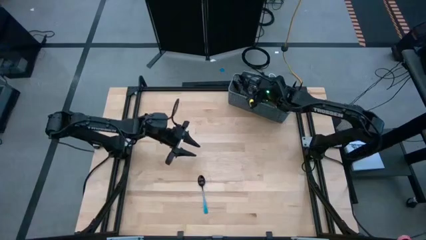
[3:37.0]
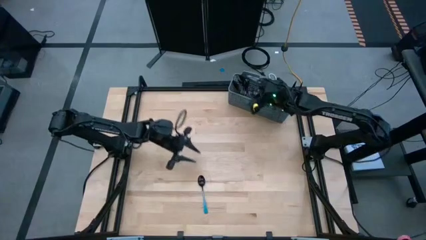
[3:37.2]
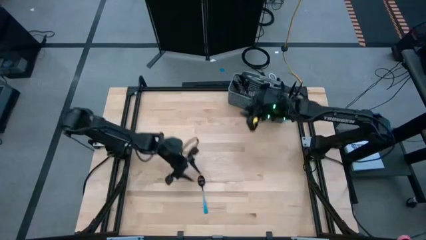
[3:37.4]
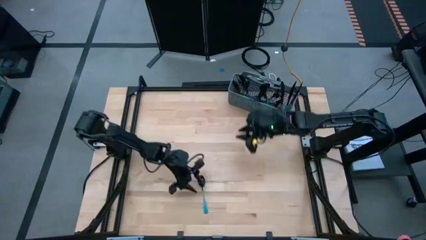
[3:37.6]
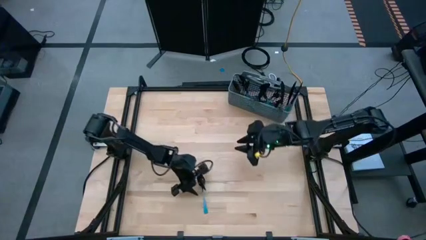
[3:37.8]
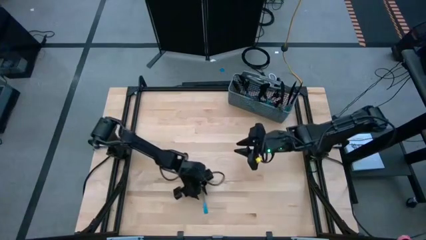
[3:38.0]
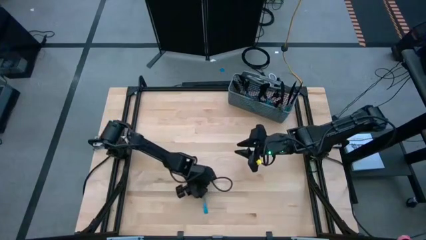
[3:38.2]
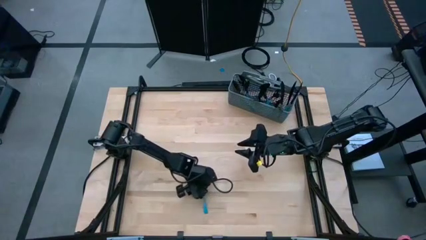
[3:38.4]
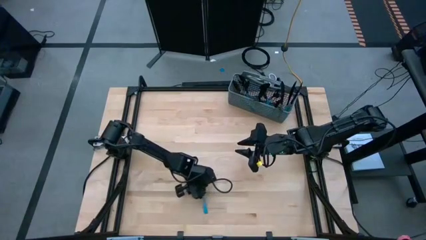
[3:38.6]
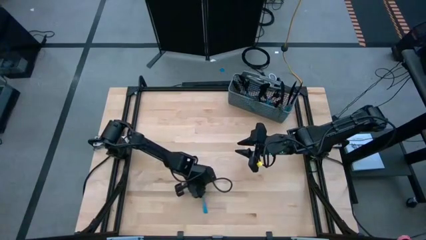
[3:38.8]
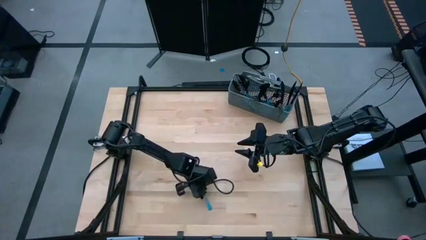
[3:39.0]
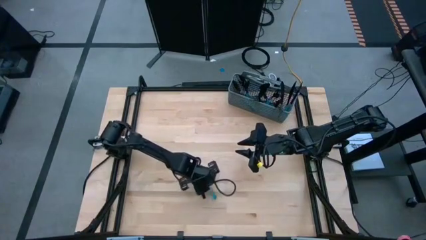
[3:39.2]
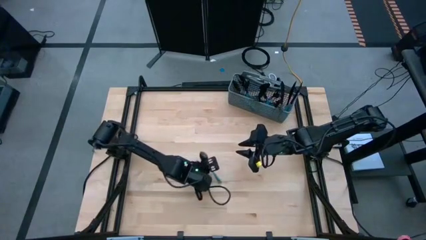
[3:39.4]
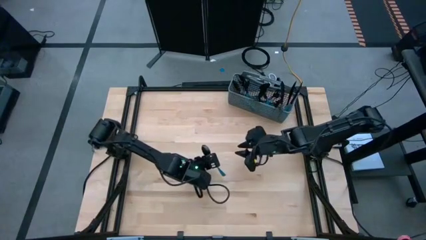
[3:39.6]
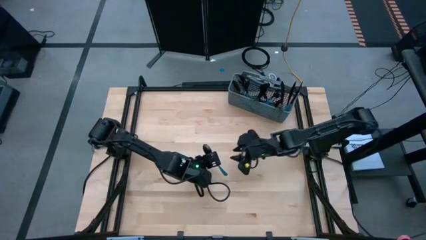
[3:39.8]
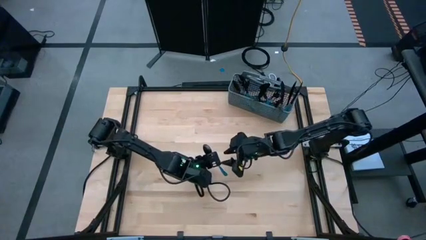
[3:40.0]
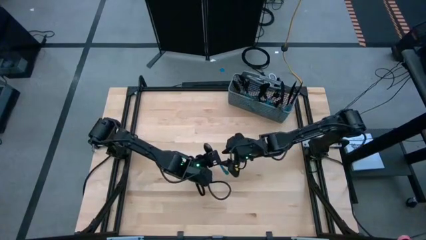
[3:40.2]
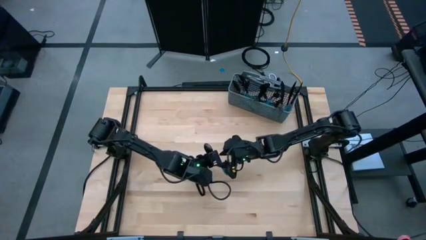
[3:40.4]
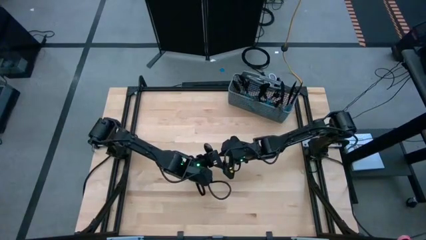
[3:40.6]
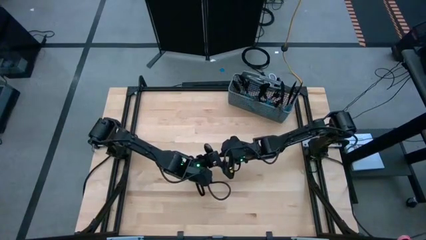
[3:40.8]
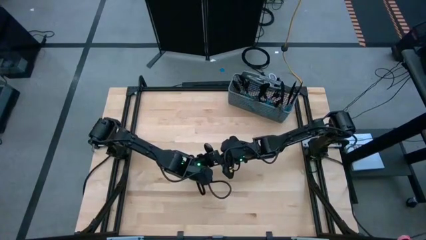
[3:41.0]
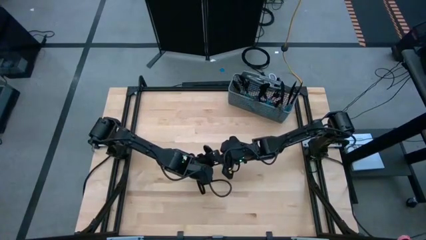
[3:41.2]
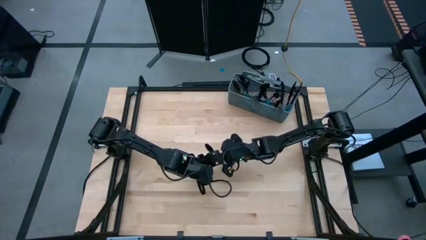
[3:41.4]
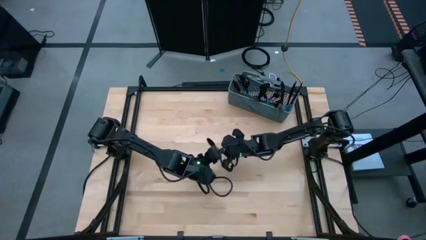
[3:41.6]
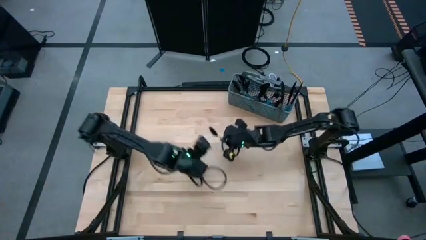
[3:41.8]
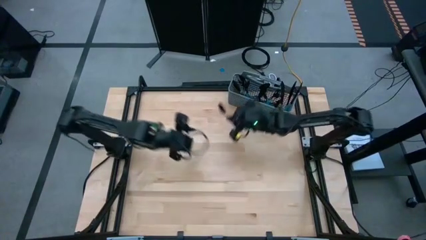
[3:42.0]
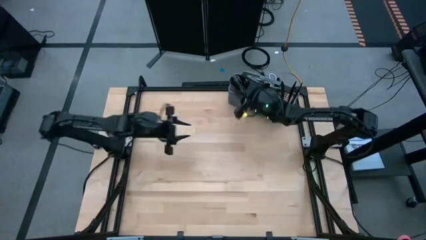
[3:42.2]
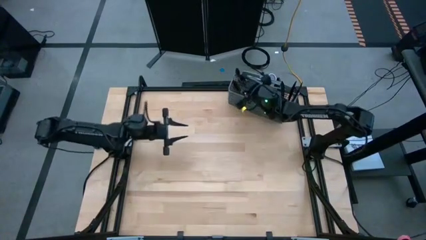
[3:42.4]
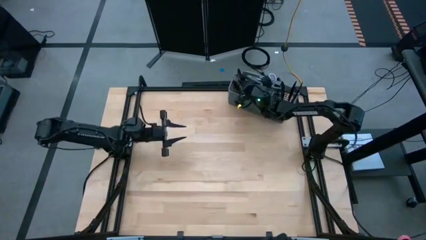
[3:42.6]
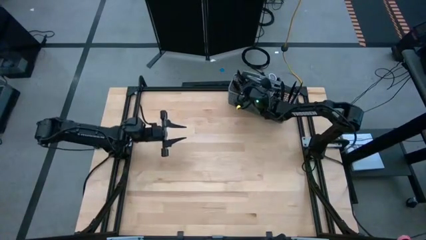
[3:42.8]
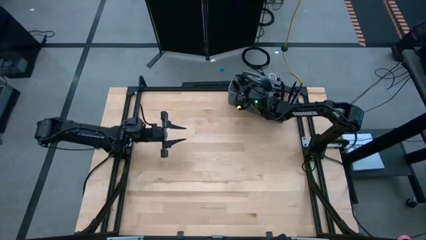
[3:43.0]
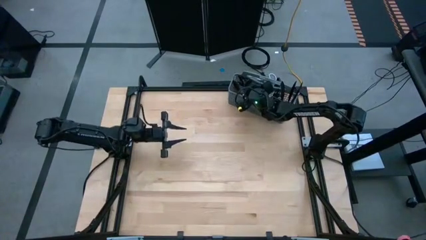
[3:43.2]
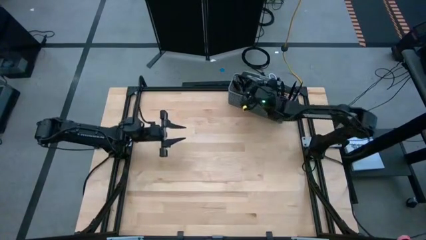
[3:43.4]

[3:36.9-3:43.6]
Task: Sort silverware
Put the blue spoon into the left of the blue utensil organizer

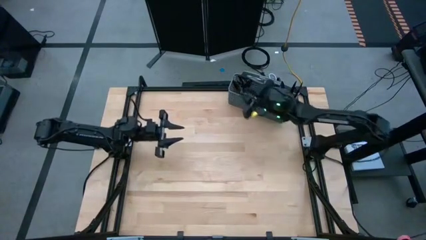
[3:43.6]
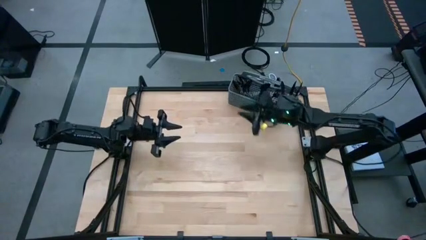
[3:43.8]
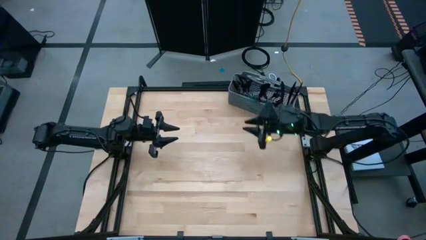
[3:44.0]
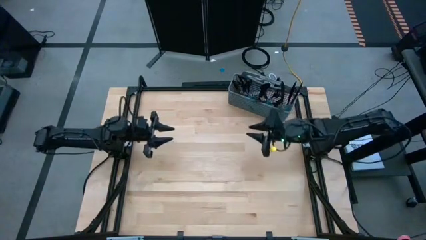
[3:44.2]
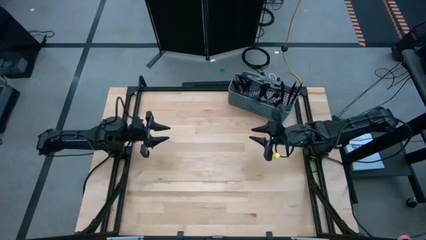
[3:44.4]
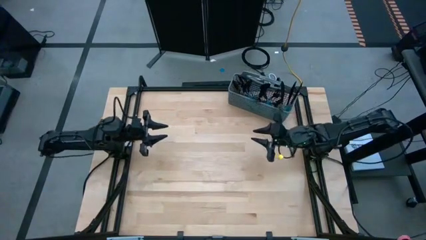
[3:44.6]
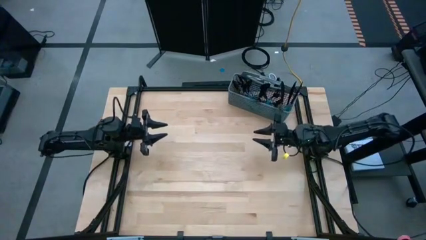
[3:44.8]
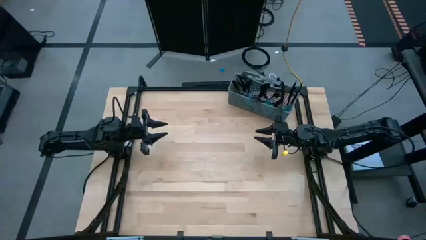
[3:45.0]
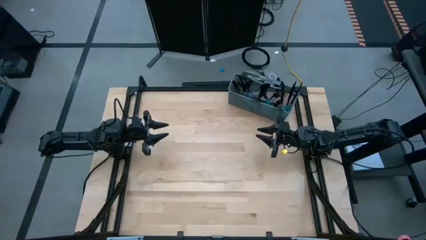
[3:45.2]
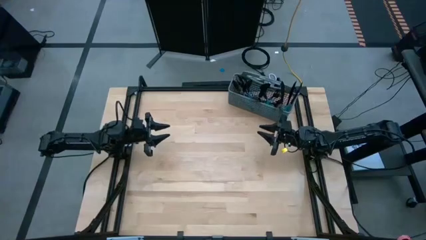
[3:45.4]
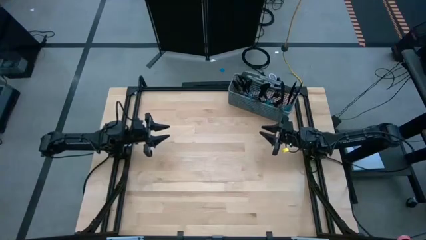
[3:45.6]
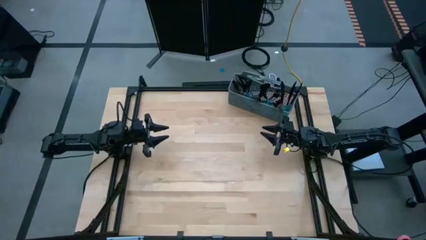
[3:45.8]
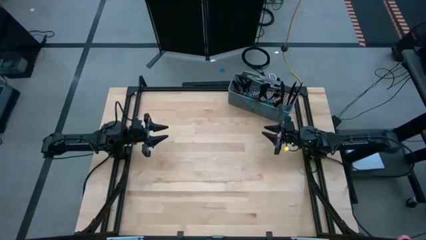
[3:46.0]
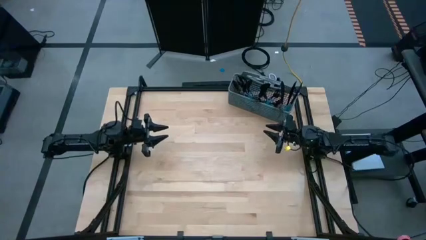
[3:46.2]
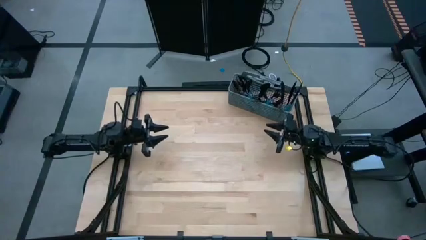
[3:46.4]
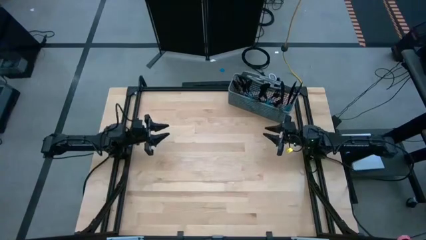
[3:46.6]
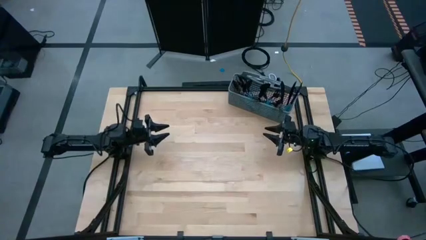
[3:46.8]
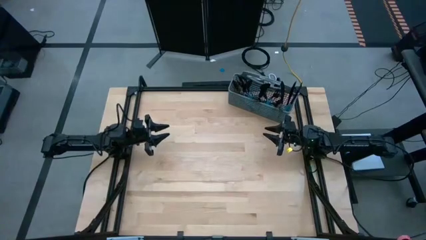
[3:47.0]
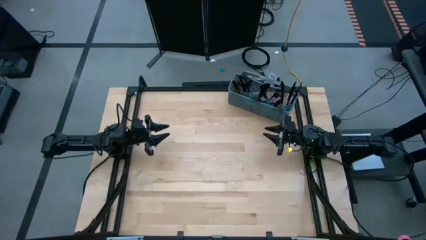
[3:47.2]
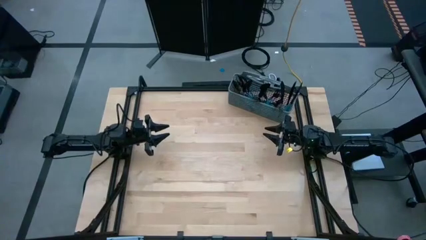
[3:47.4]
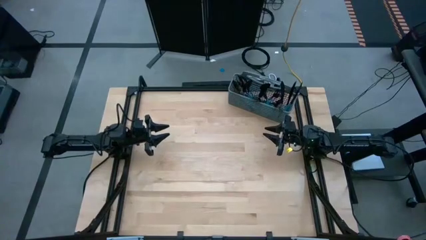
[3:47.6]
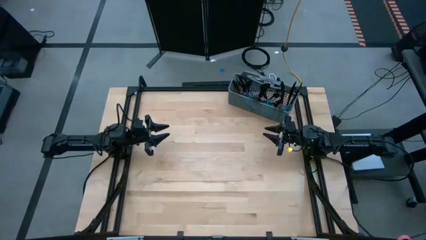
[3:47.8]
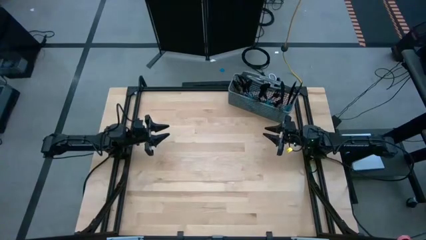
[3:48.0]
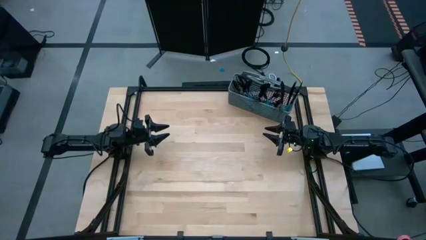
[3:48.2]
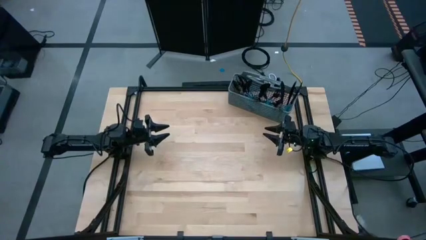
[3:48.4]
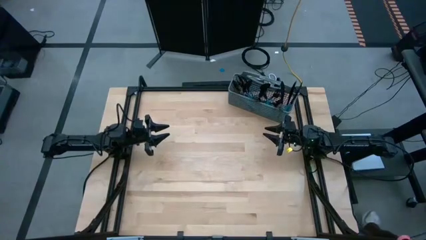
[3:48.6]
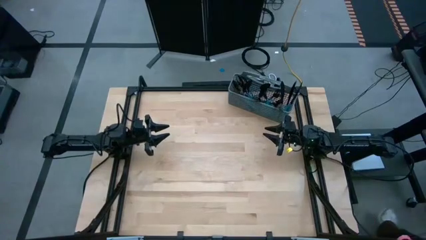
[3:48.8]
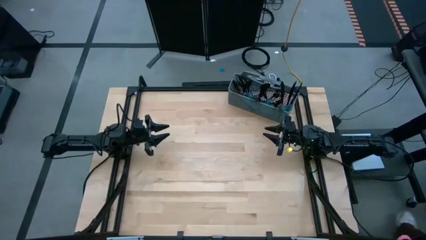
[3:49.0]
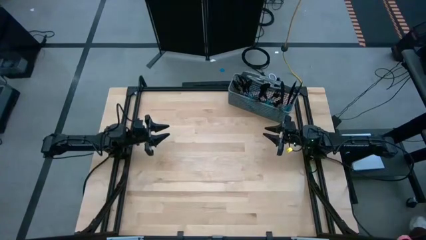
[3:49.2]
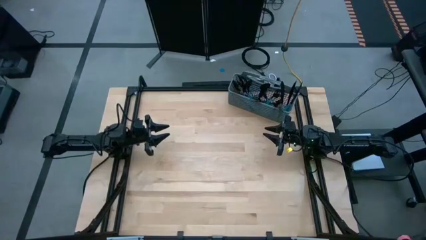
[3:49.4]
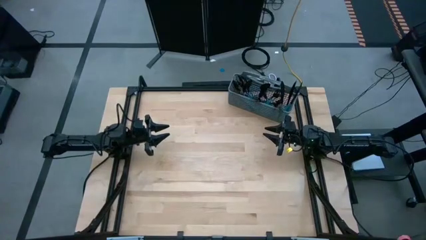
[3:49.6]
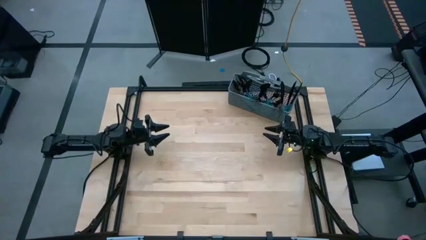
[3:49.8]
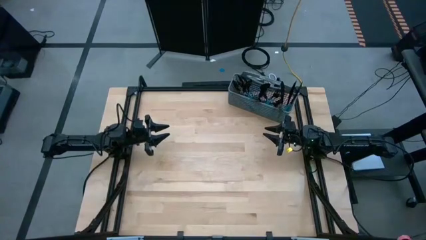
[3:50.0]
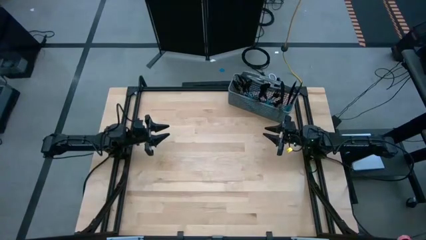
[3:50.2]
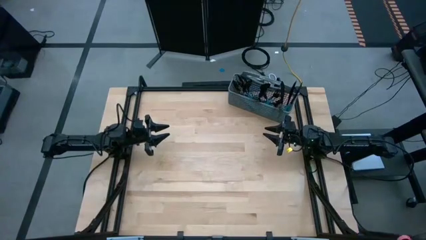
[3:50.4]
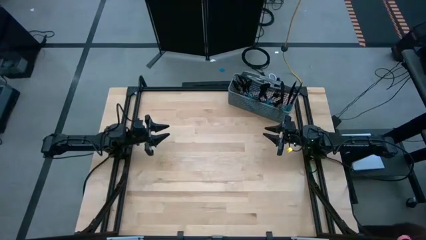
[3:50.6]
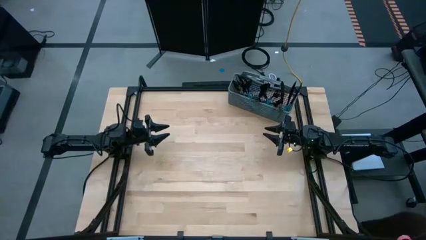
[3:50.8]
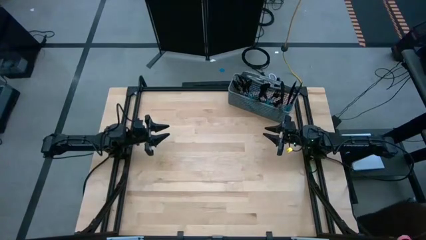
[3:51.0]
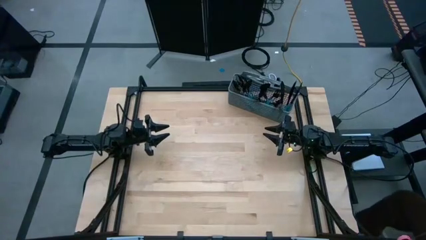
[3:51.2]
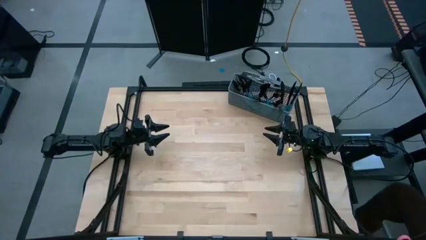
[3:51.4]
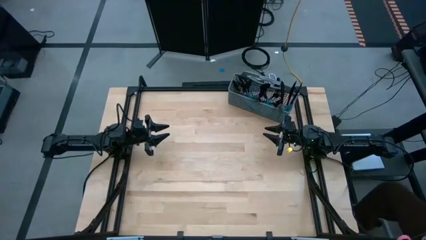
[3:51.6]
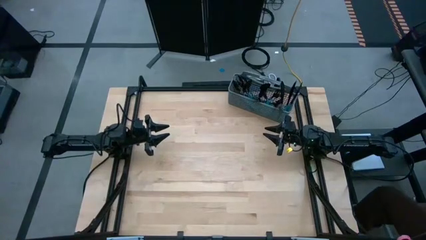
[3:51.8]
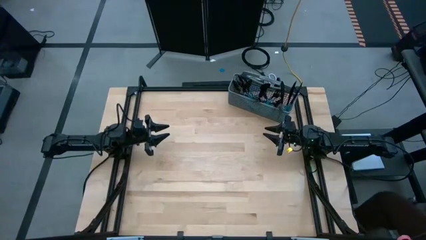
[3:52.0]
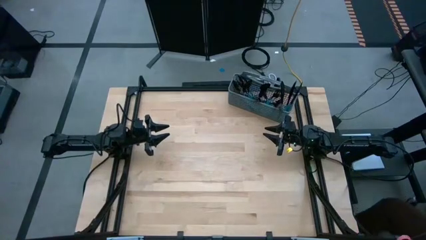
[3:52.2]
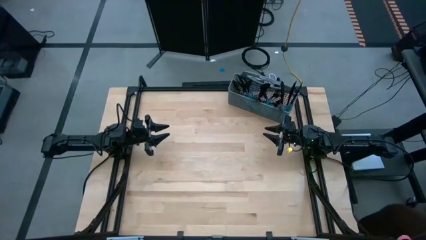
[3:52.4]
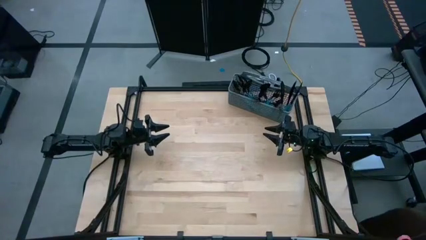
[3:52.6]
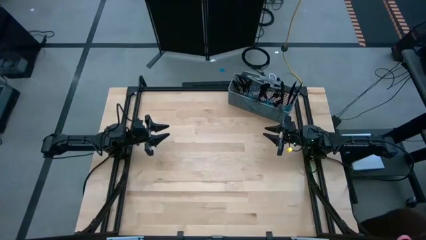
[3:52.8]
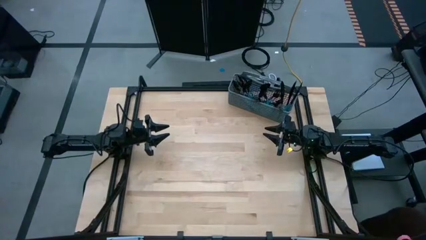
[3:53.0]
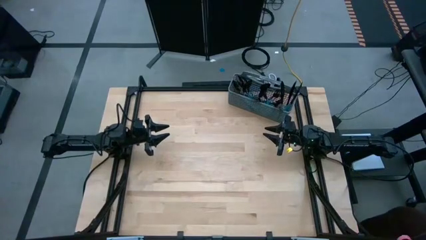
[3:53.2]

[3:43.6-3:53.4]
Return to Home Position
